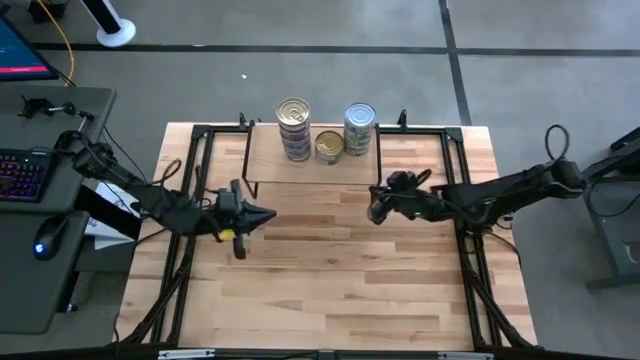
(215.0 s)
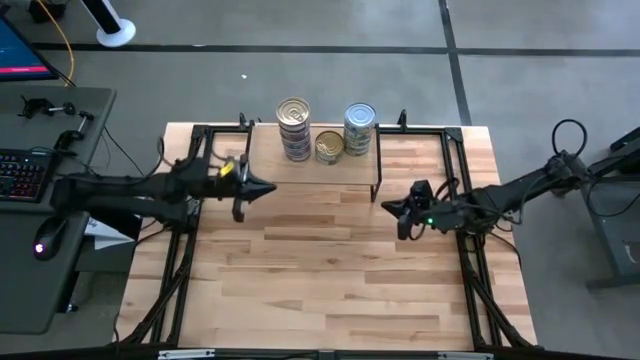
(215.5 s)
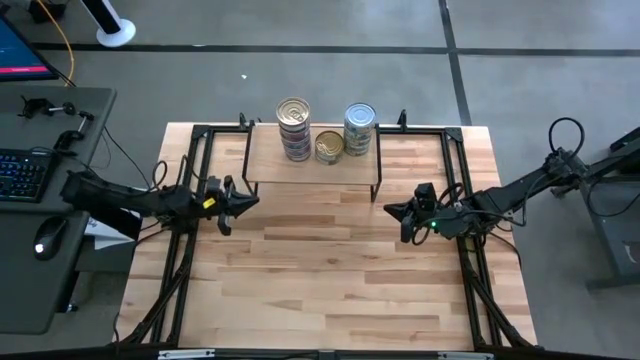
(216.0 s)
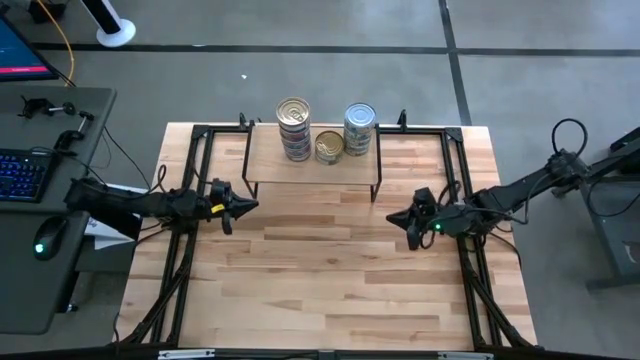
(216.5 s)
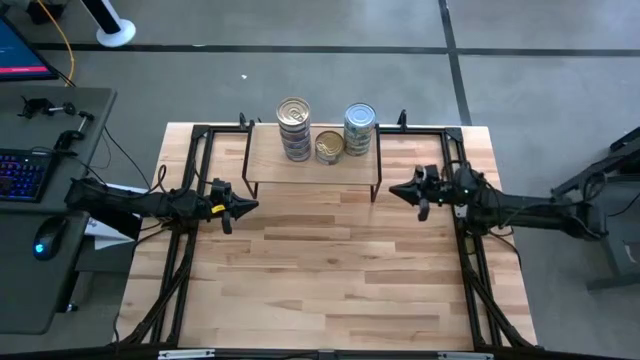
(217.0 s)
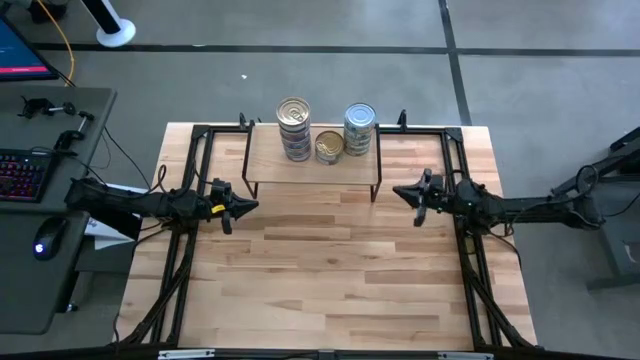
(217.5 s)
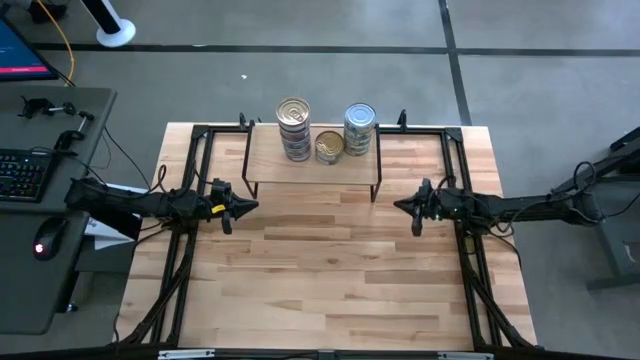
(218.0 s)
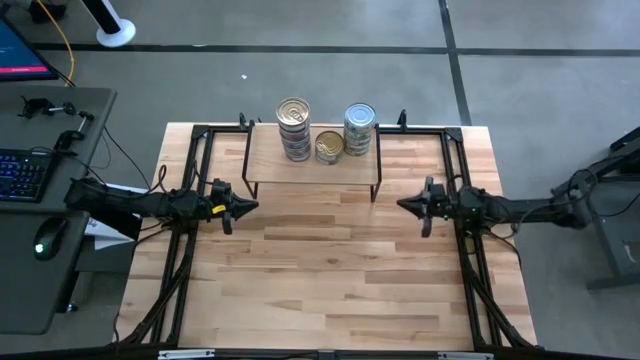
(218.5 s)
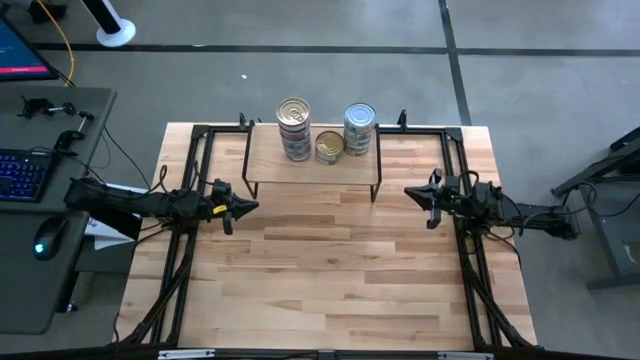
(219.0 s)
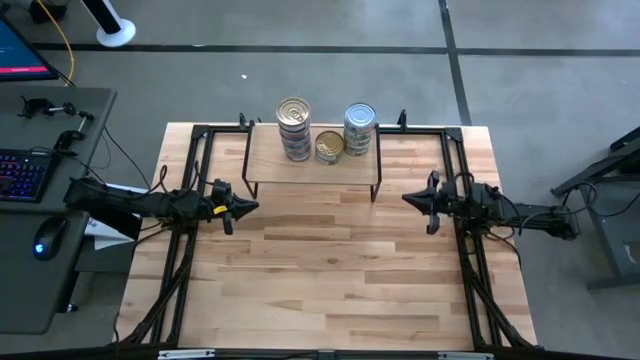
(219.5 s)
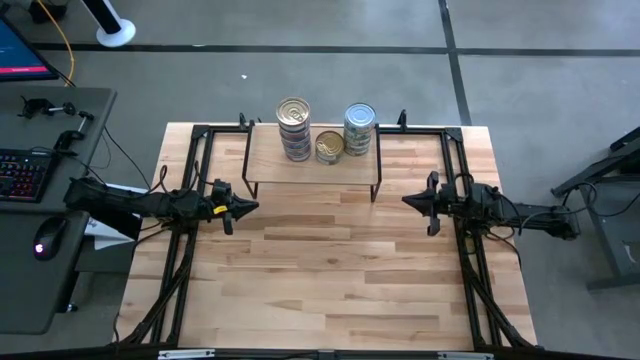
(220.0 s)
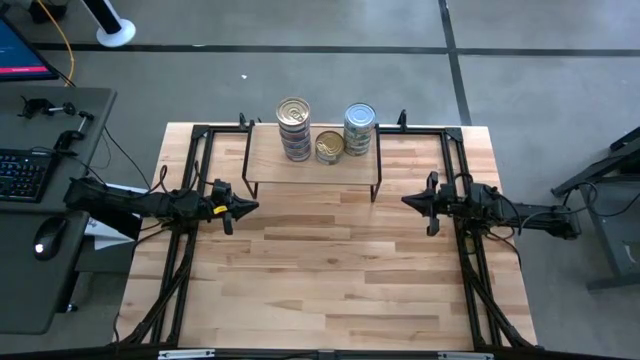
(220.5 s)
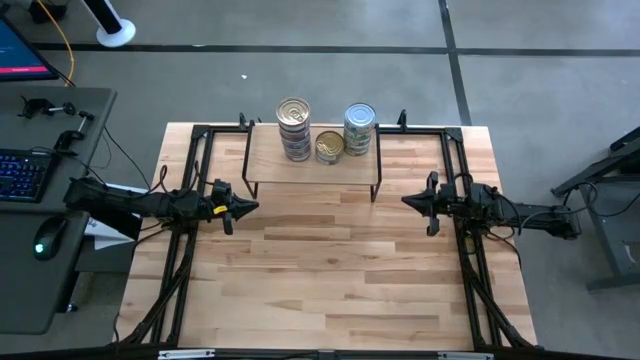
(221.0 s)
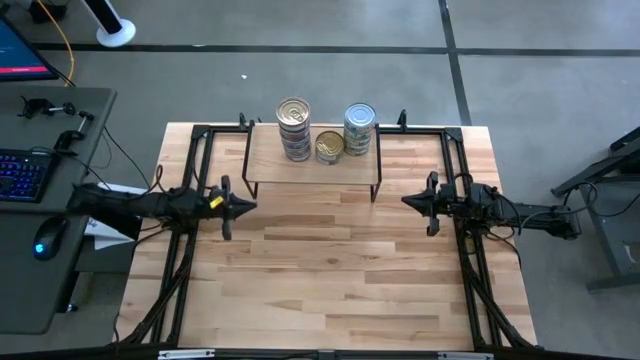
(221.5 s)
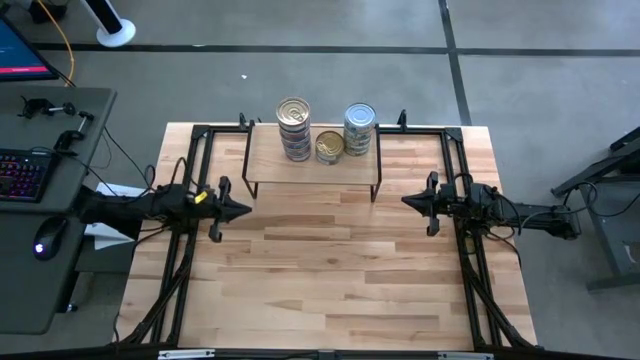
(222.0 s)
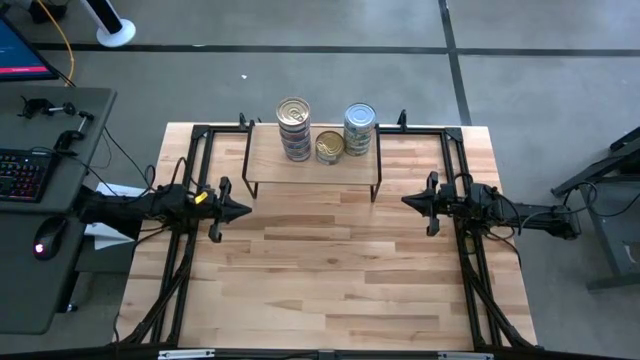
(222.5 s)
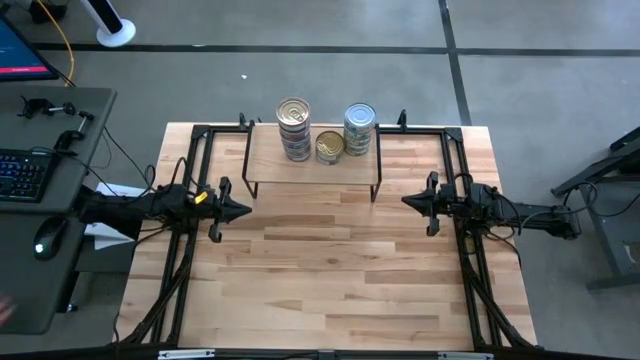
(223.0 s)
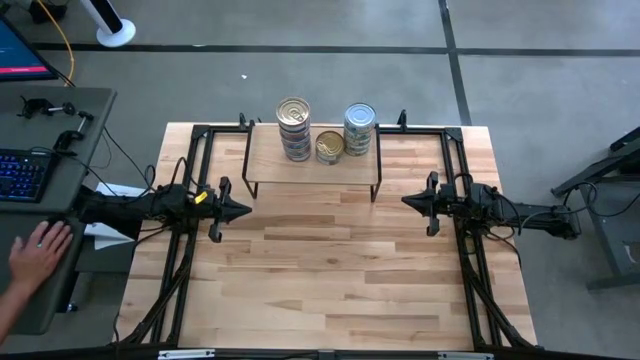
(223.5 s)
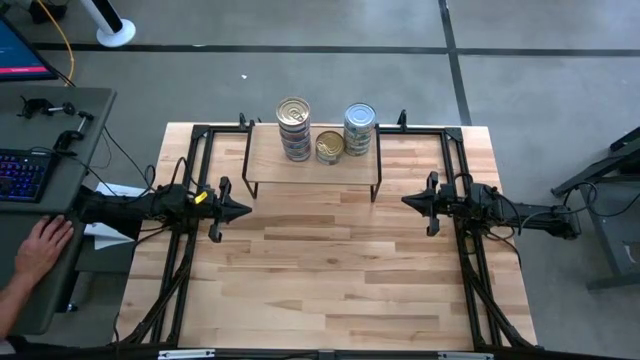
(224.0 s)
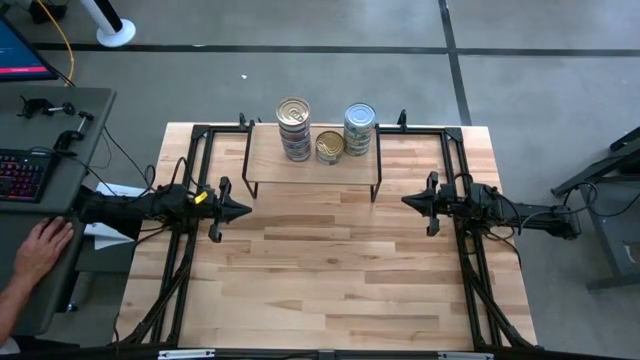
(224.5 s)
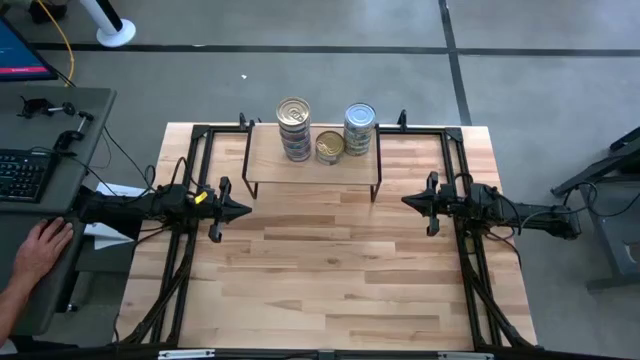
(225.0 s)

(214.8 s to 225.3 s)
Task: Stack canned seafood by type on shelf
Return to Home Position

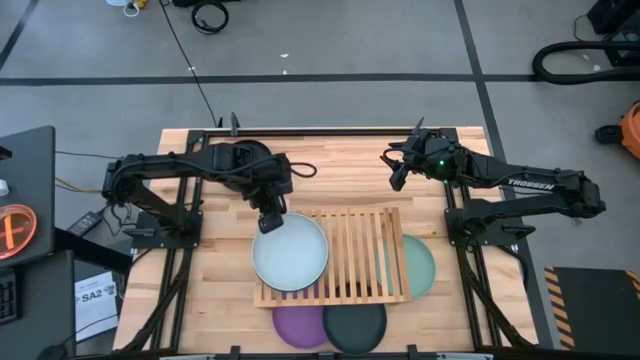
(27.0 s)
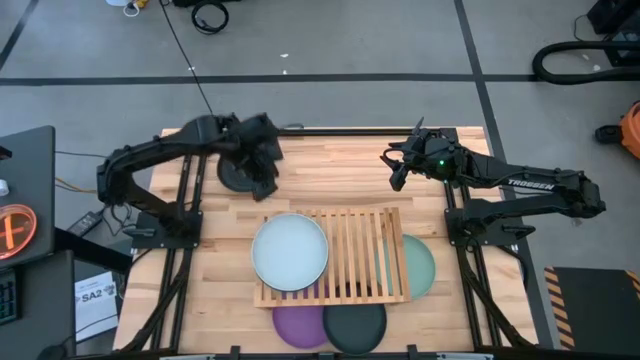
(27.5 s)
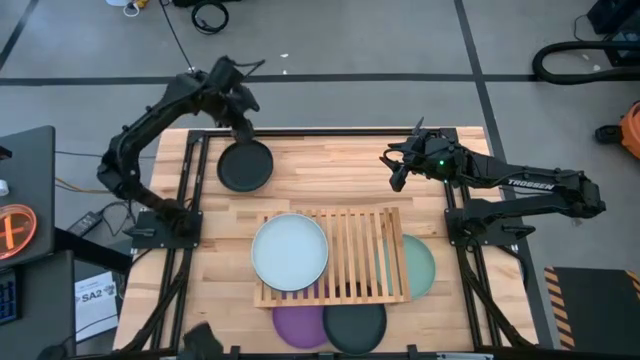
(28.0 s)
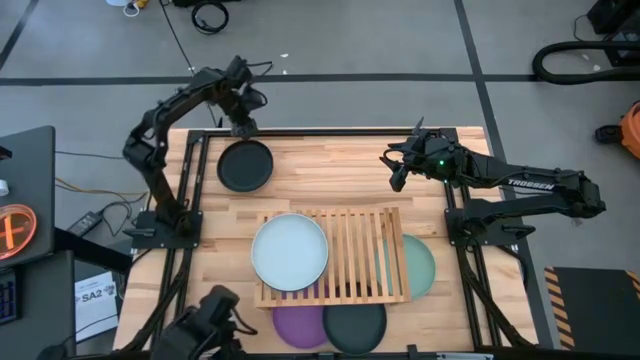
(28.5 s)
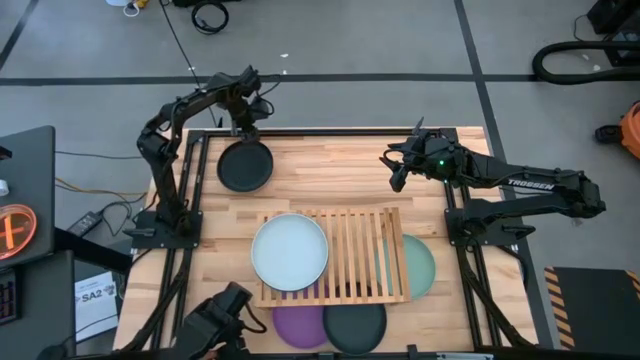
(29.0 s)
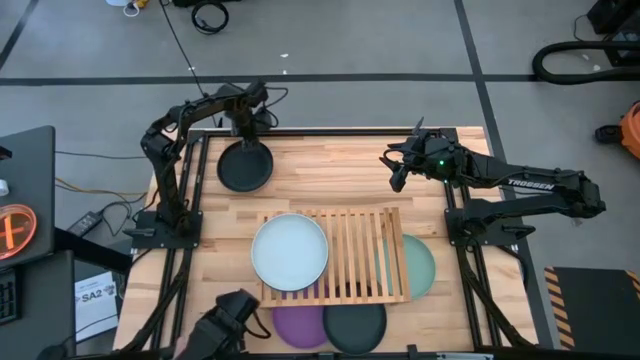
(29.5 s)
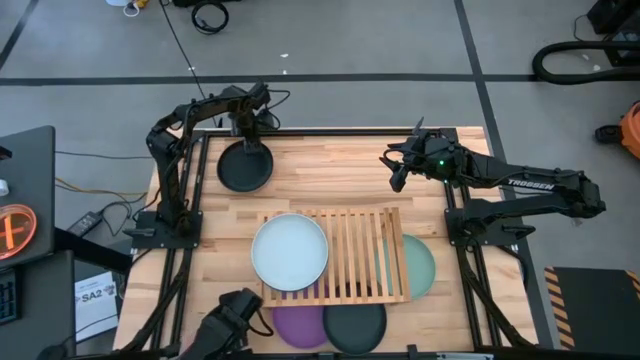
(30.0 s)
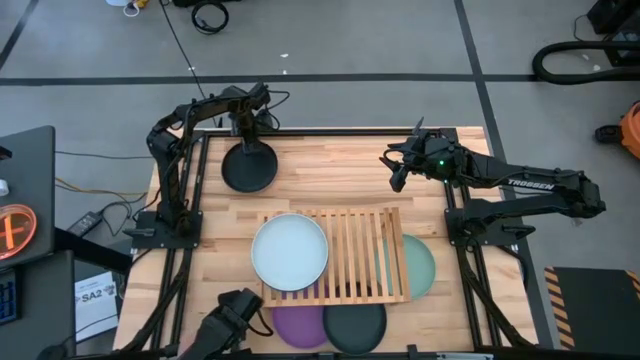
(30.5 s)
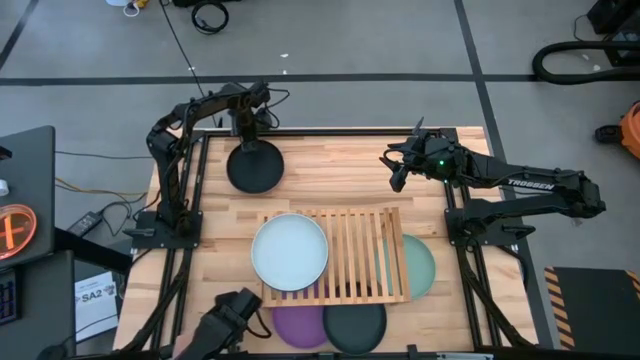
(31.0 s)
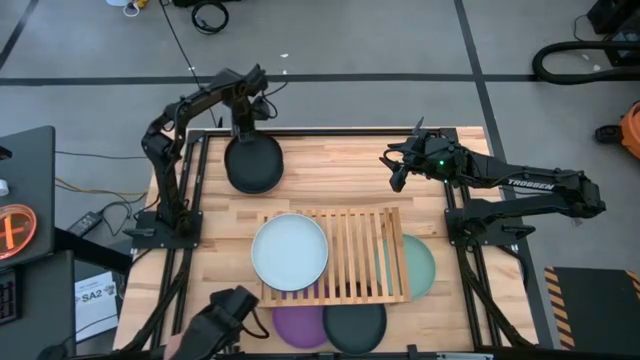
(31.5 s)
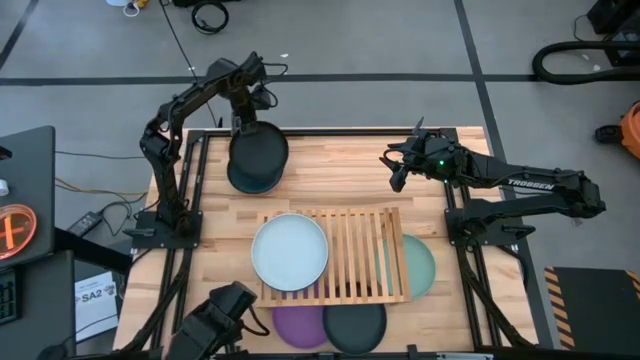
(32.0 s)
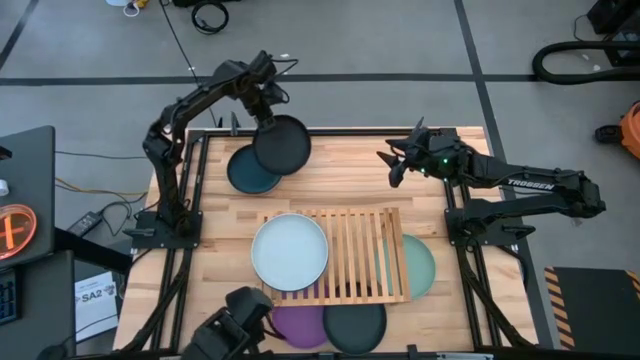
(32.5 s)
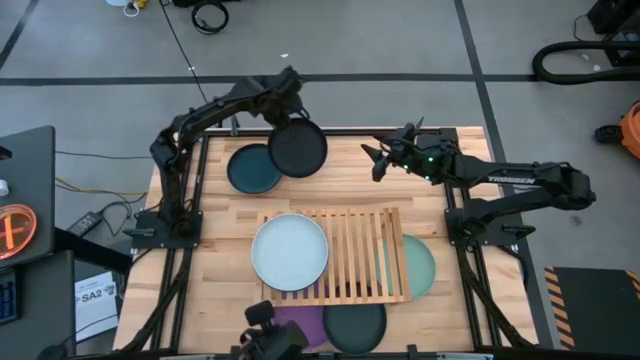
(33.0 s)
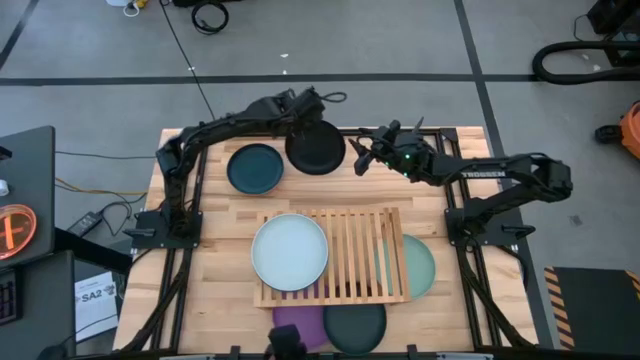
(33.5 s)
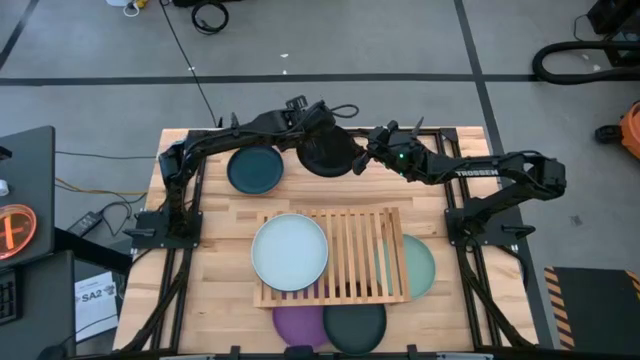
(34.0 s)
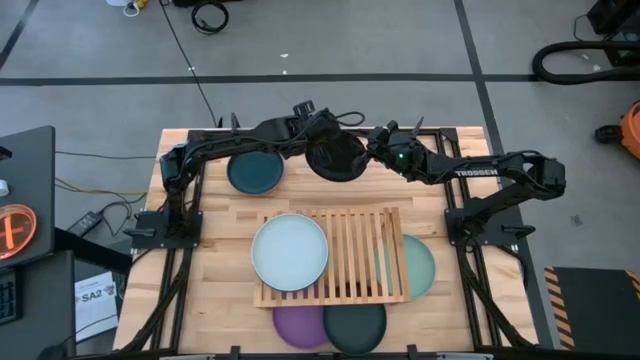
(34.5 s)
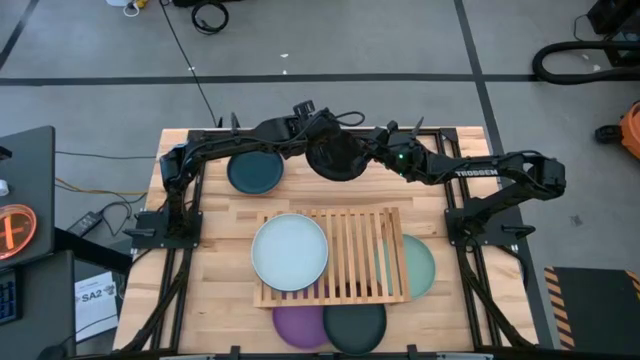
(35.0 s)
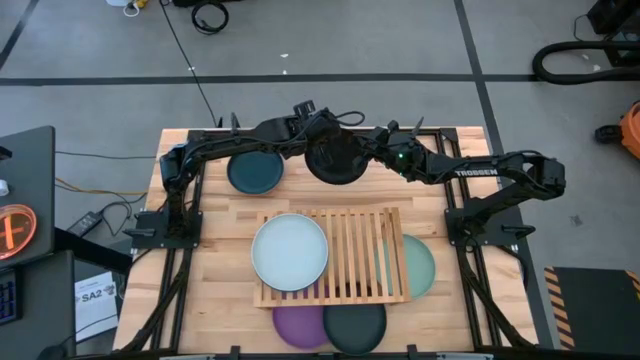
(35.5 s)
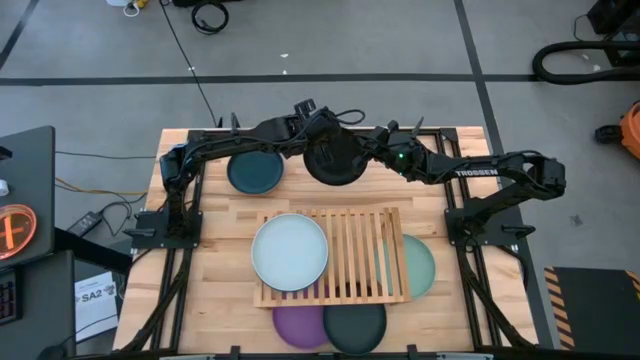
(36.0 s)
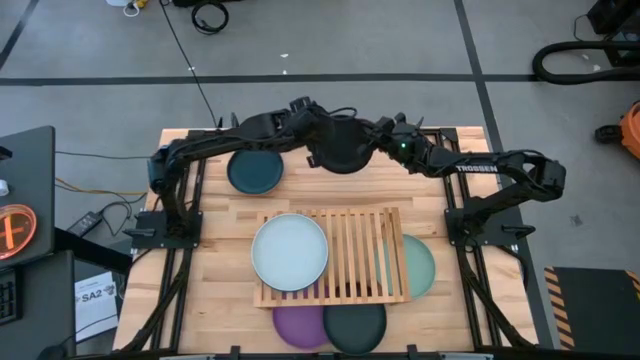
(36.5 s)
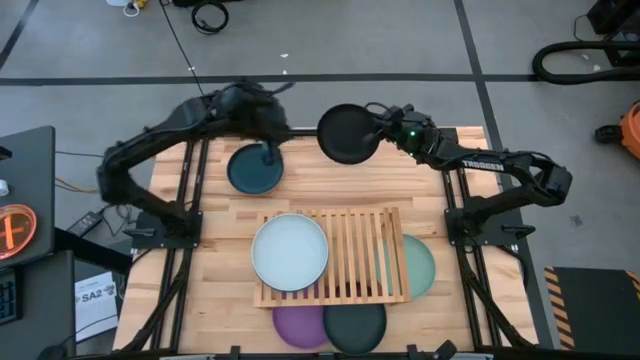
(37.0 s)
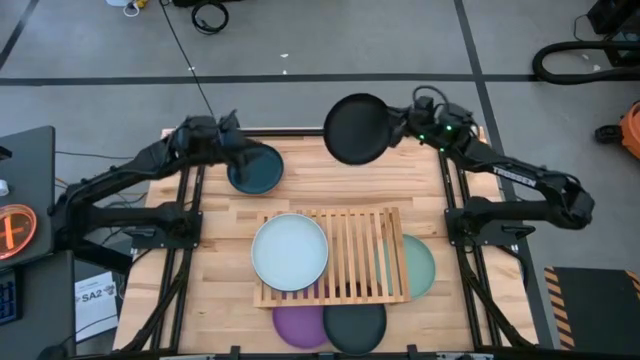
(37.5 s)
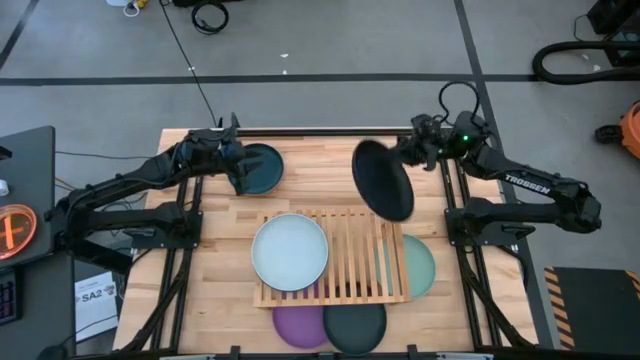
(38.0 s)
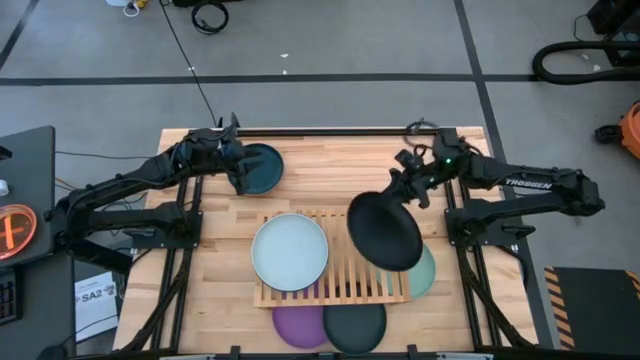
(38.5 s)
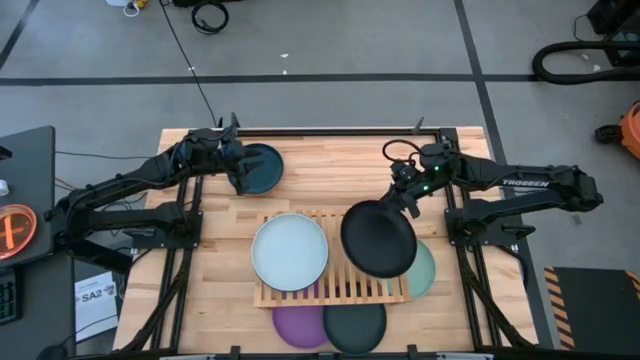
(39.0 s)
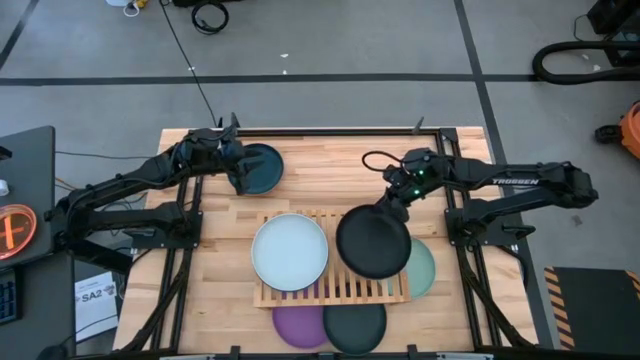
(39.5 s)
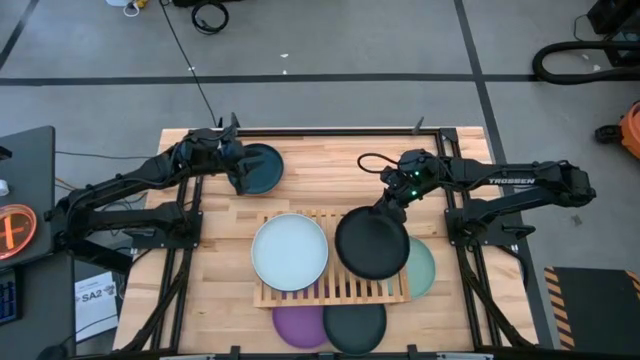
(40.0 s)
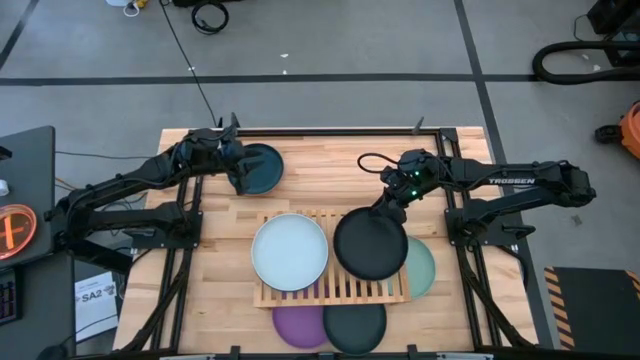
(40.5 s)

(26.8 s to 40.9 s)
Task: Place and stack plates onto a shelf
Put the black plate on the shelf
